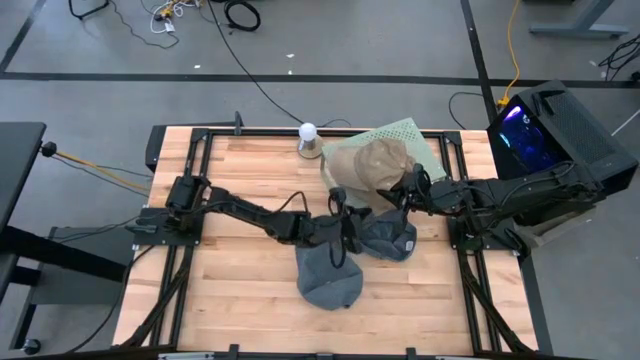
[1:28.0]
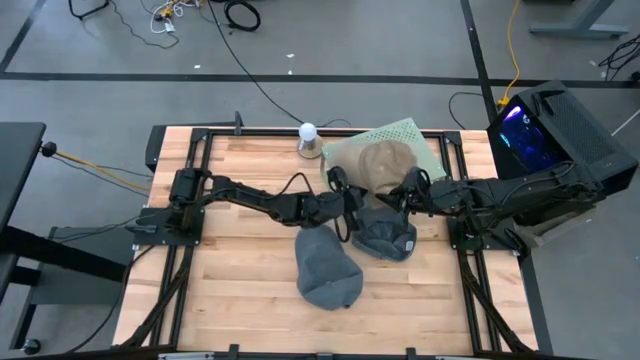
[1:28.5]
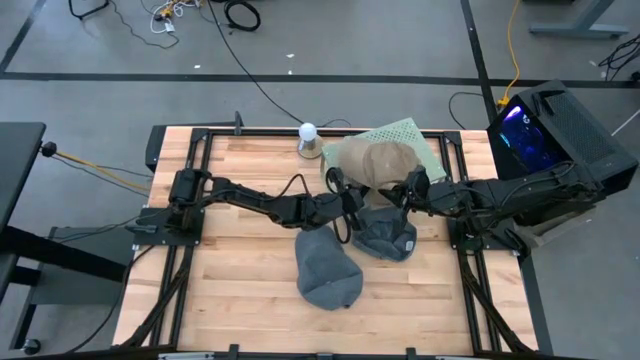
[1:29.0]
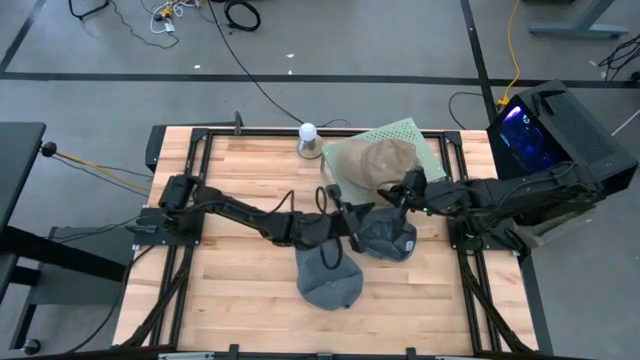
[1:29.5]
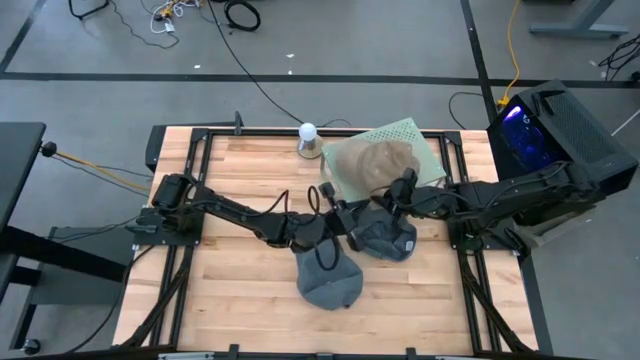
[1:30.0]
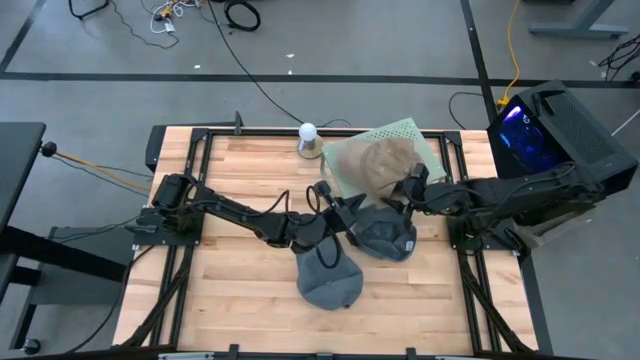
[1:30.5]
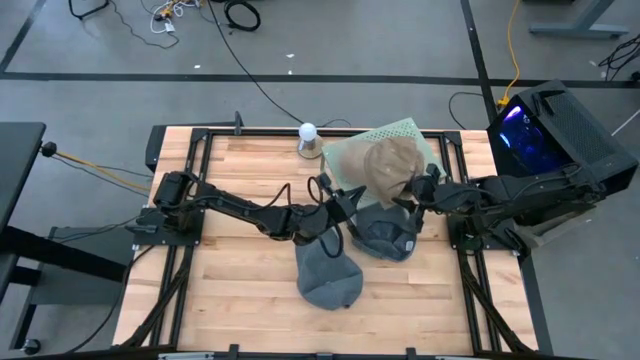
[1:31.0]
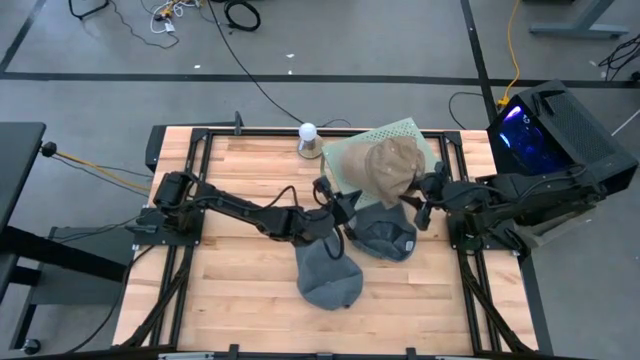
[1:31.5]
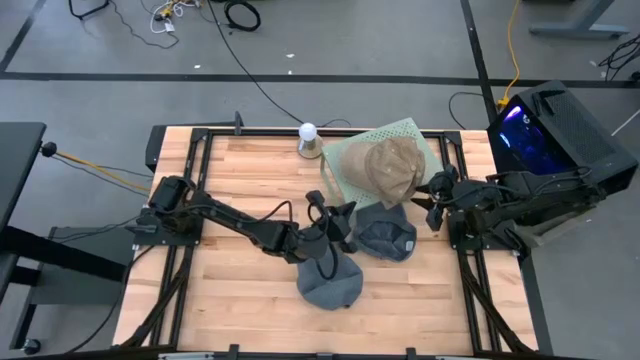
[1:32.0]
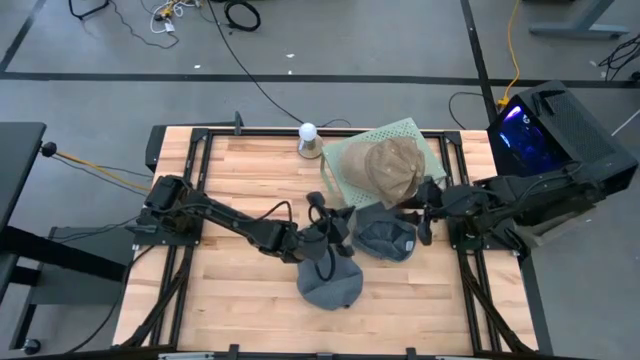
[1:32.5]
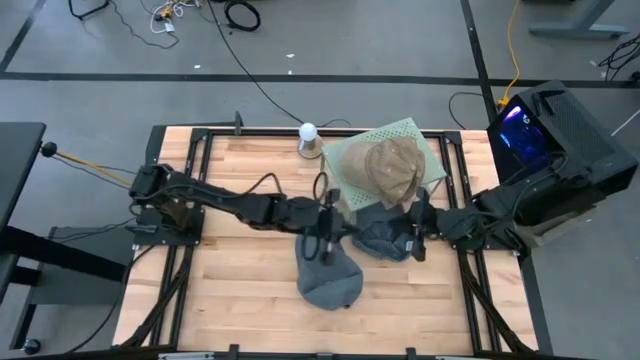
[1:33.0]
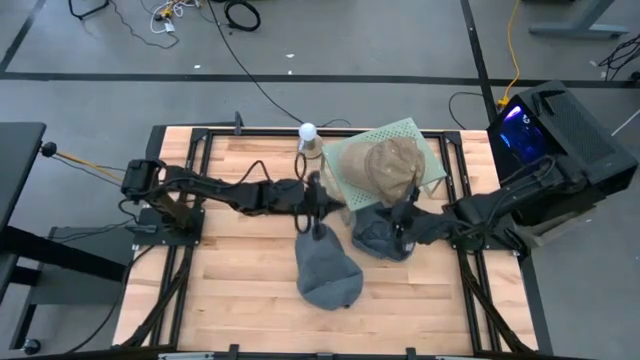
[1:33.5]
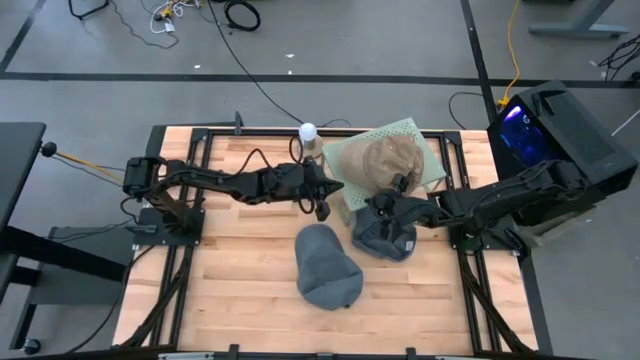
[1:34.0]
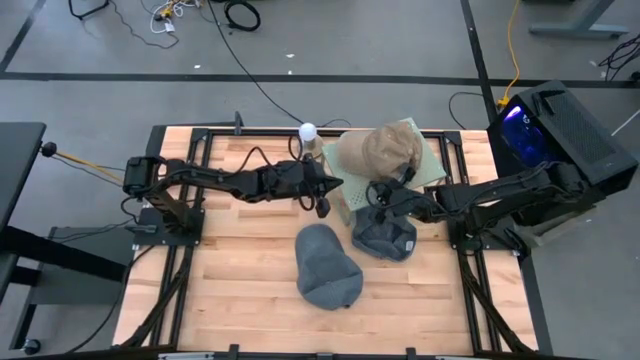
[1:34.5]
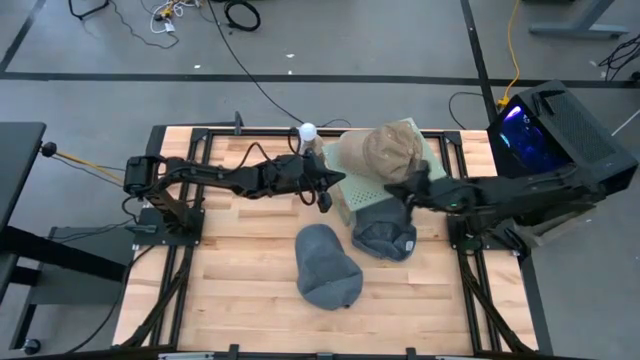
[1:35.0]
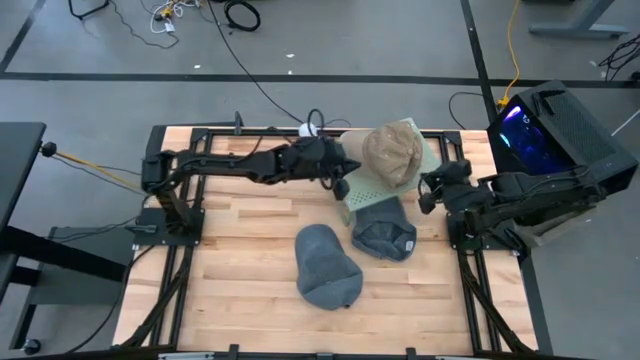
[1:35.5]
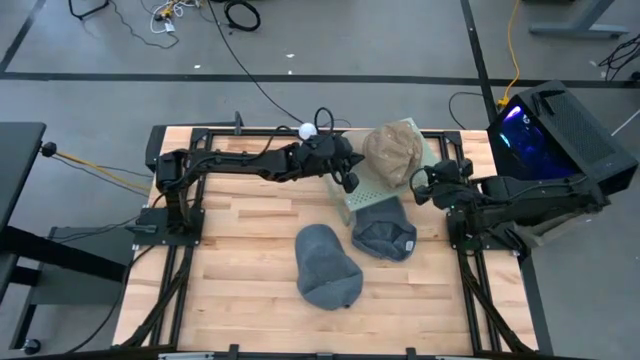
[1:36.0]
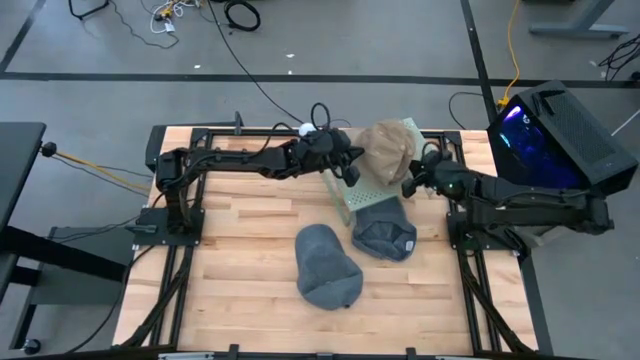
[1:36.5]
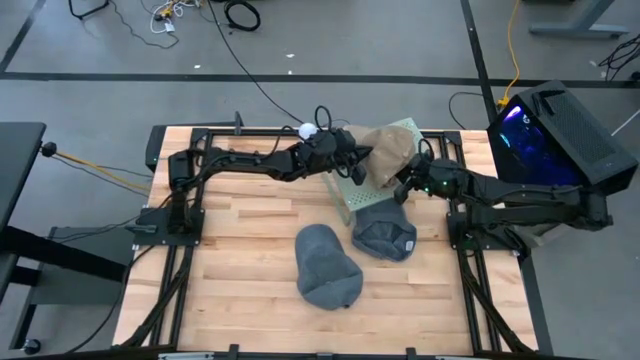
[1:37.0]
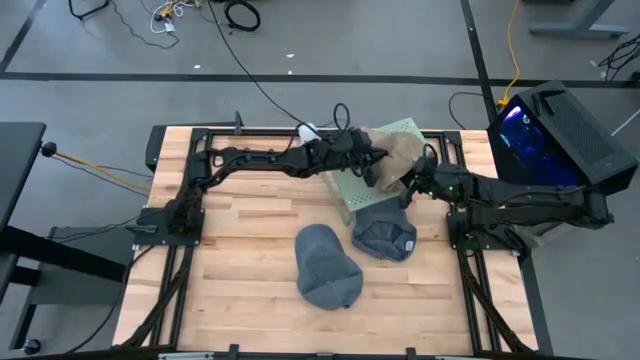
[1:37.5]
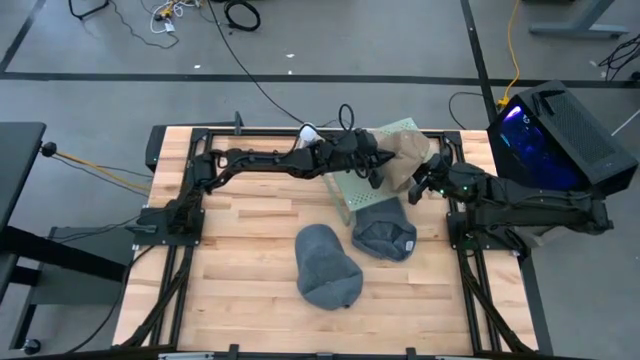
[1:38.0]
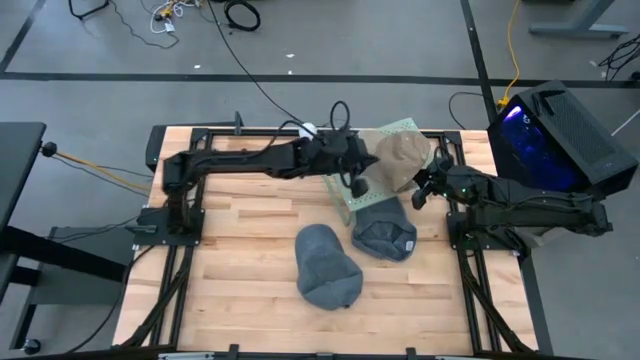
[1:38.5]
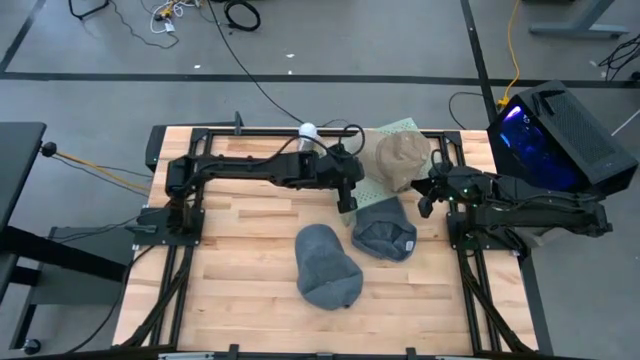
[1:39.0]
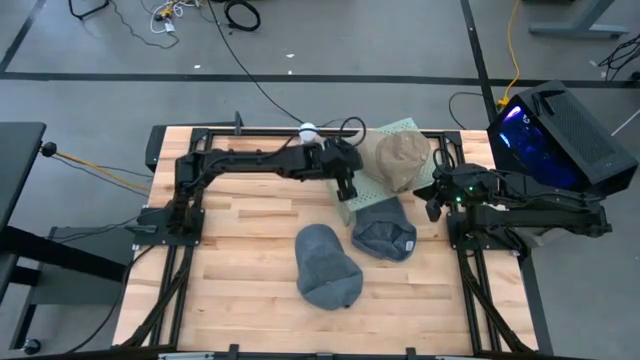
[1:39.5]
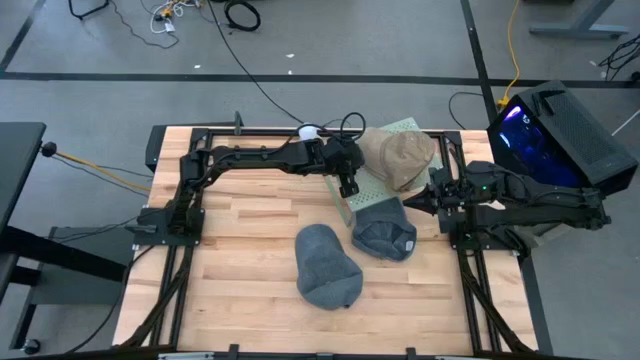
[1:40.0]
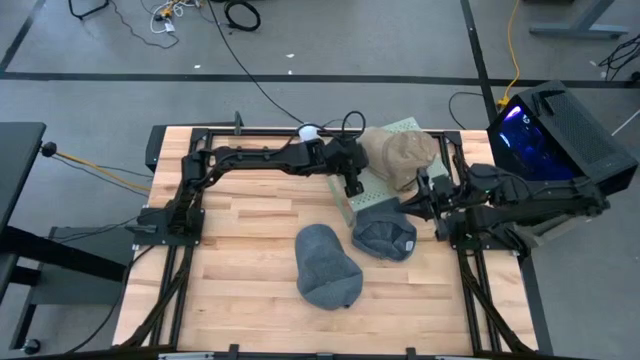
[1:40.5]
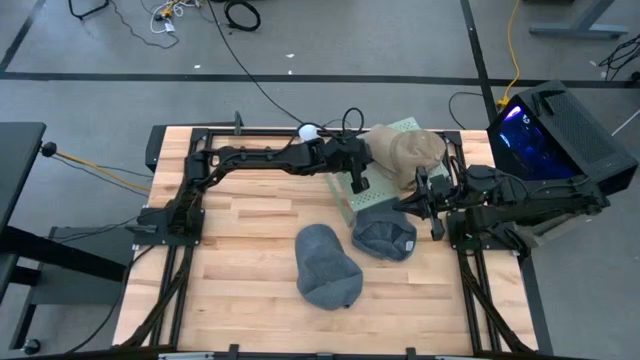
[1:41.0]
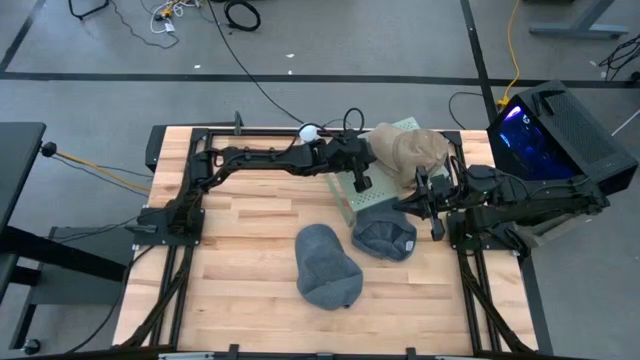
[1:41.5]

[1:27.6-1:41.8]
Task: Stack caps on shelf
Adjust the brown caps

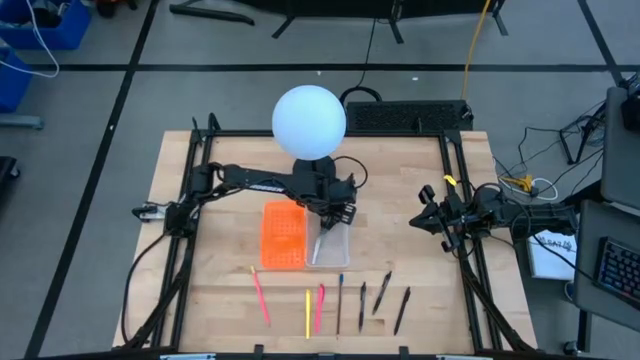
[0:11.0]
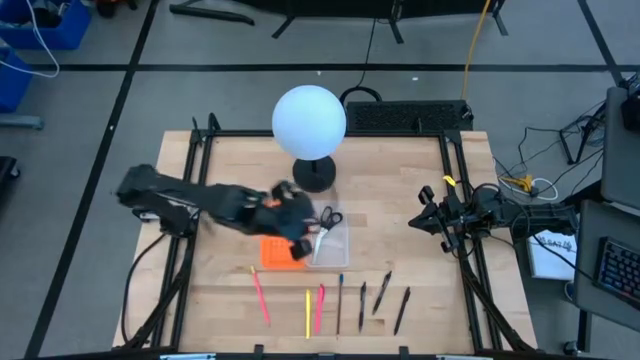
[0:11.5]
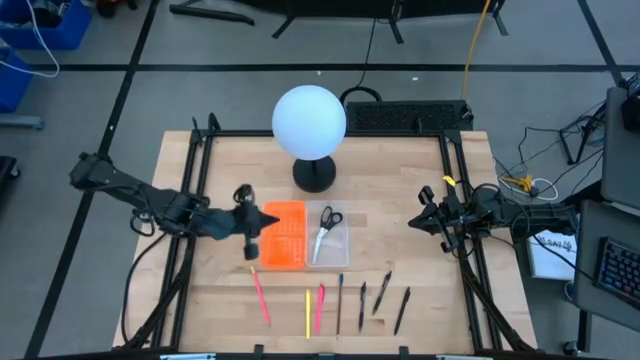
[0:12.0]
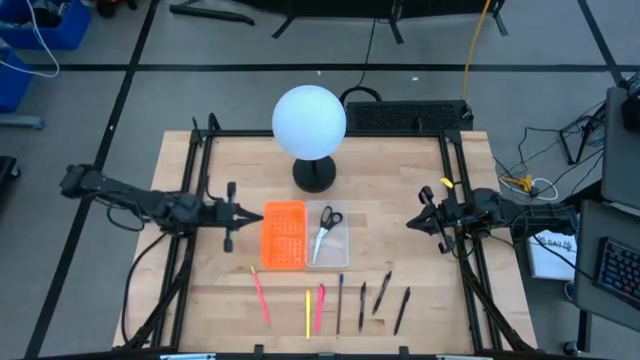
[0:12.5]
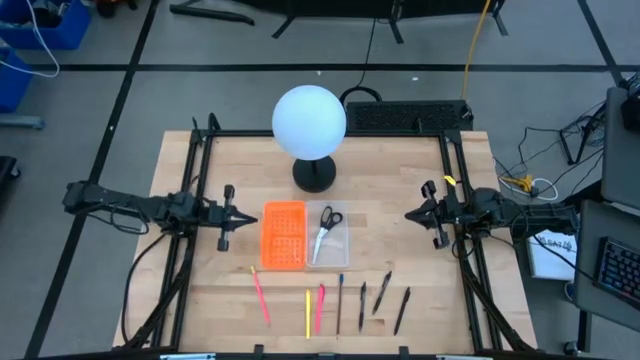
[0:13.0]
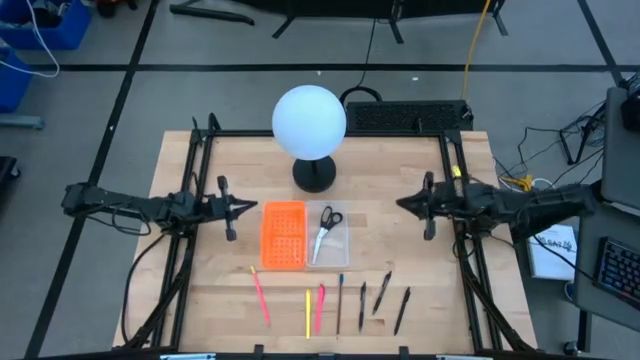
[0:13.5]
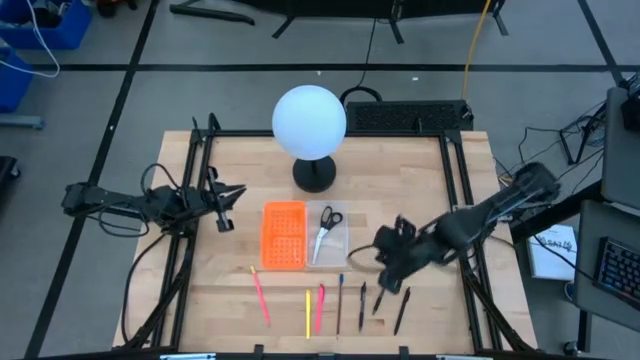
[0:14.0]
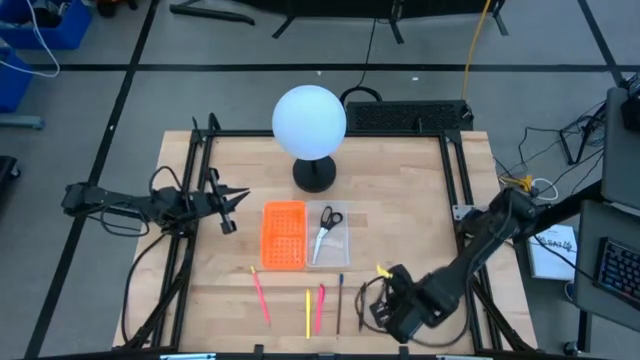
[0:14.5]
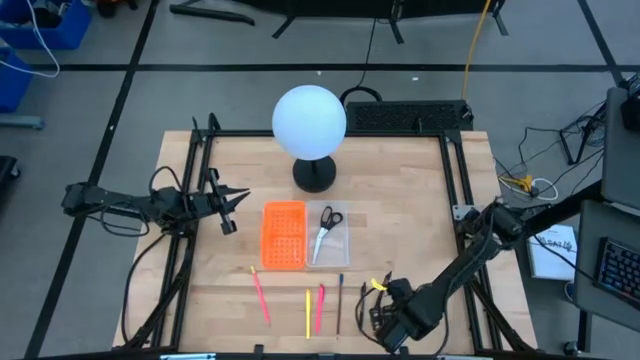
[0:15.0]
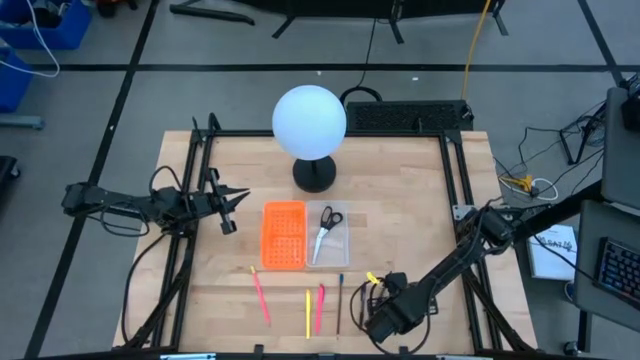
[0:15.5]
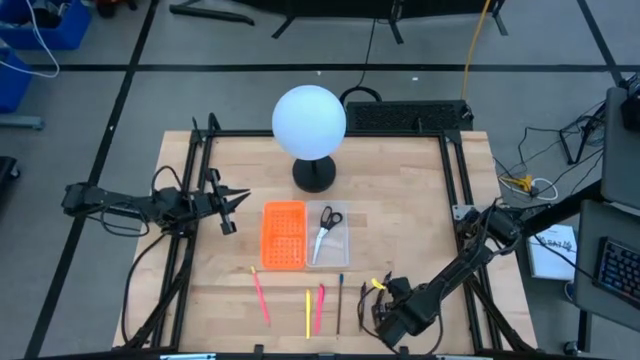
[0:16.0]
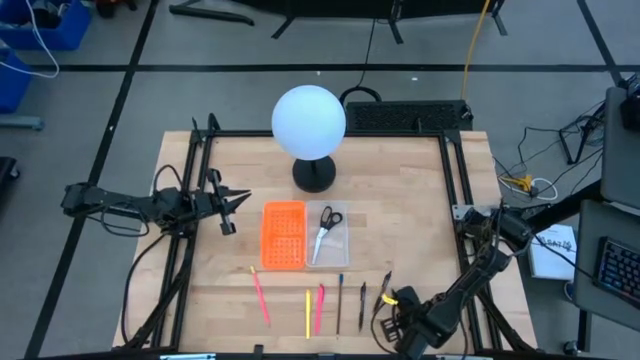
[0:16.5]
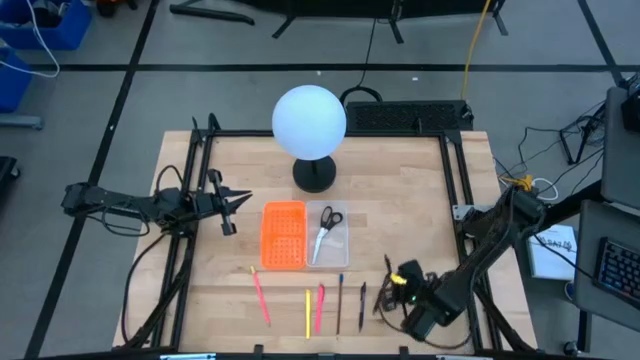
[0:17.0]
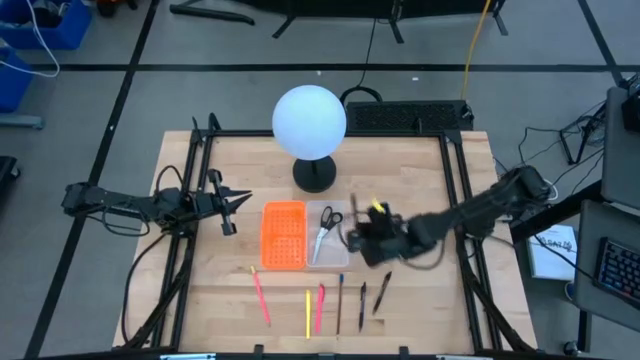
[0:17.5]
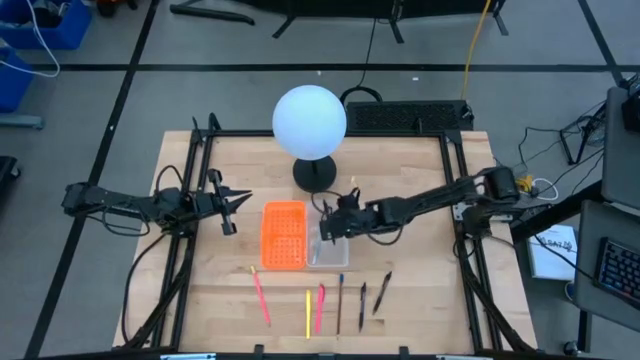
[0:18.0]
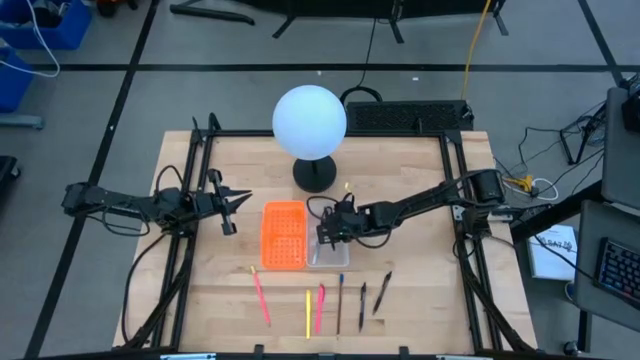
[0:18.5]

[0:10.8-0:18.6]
Task: Pick & place school supplies into a supply box
Put the right black pen into the pencil box
